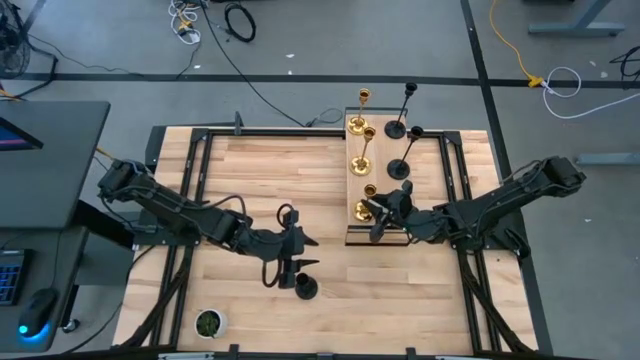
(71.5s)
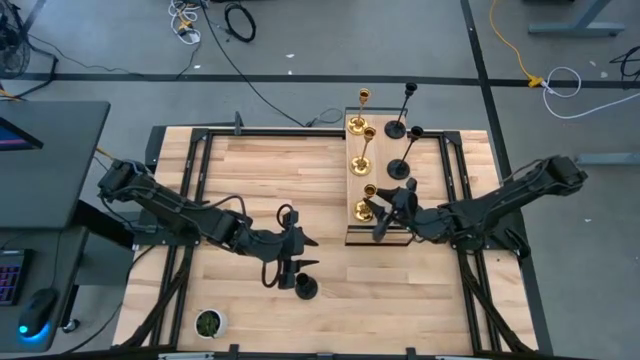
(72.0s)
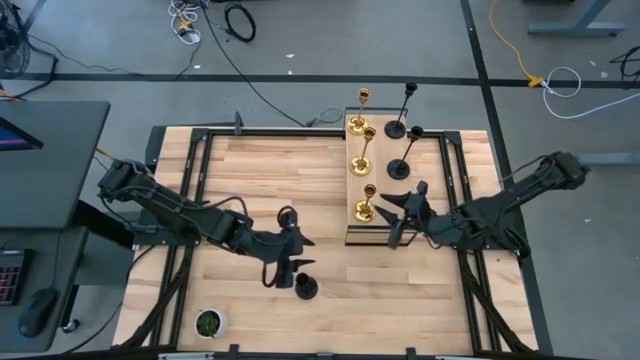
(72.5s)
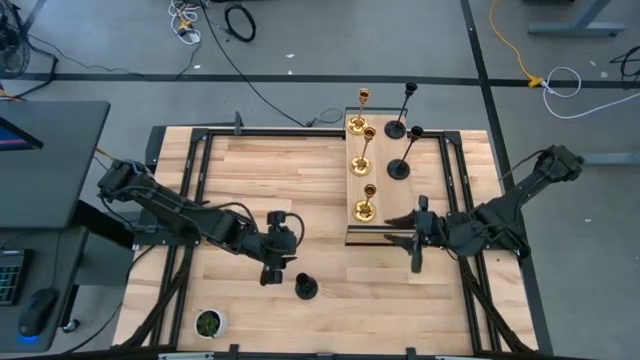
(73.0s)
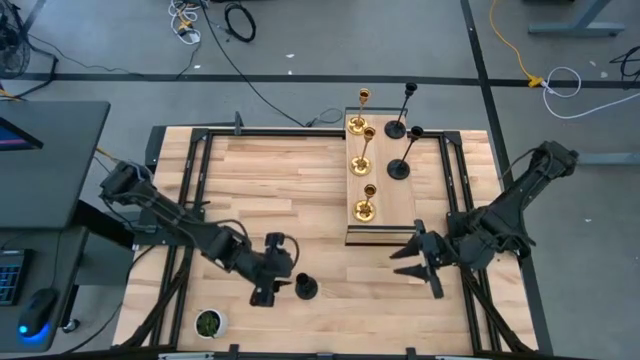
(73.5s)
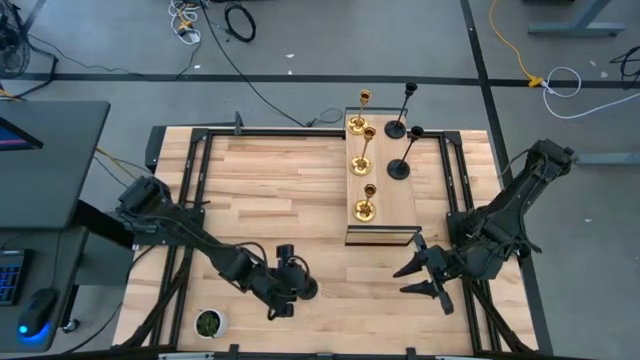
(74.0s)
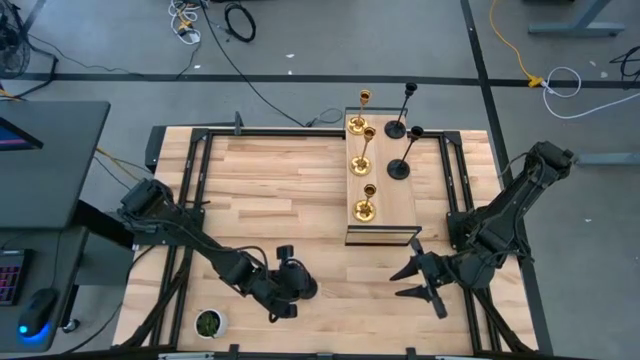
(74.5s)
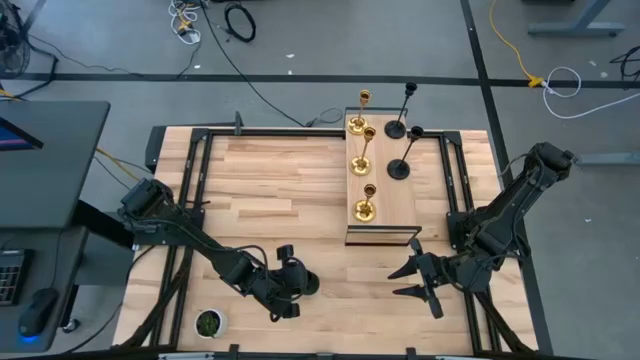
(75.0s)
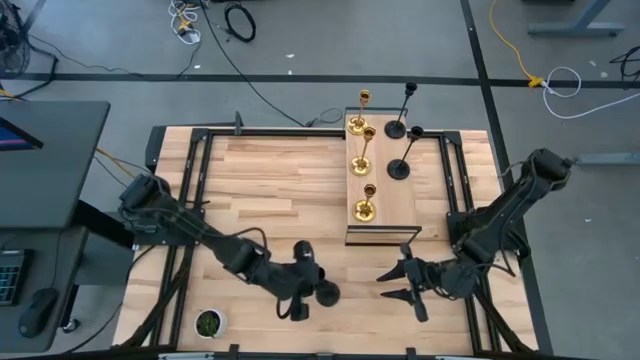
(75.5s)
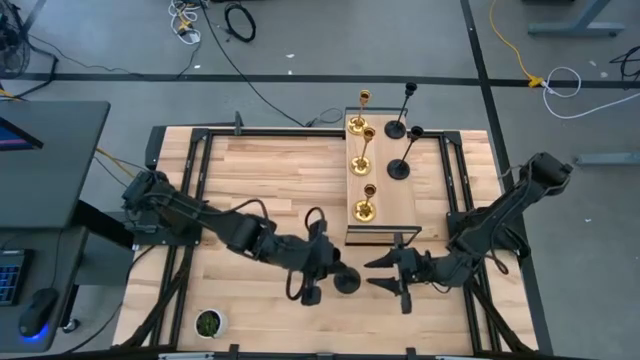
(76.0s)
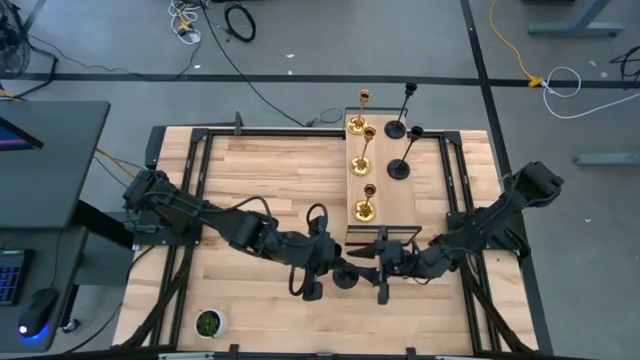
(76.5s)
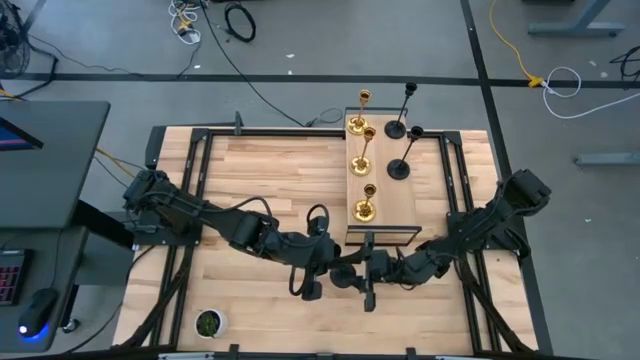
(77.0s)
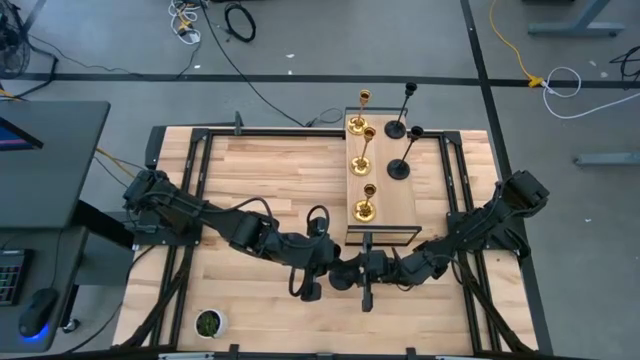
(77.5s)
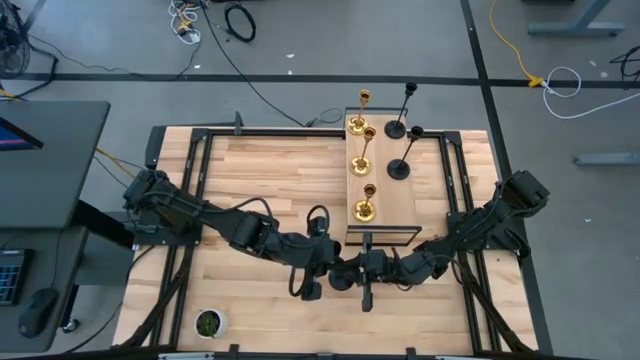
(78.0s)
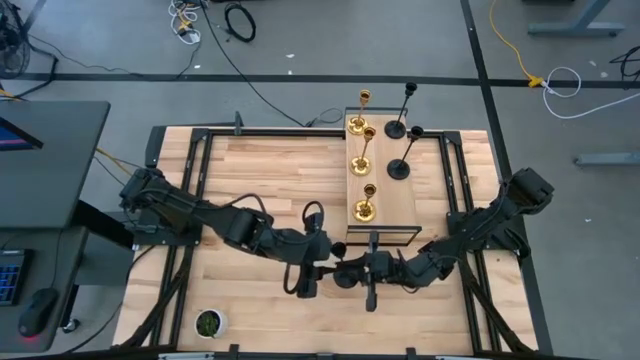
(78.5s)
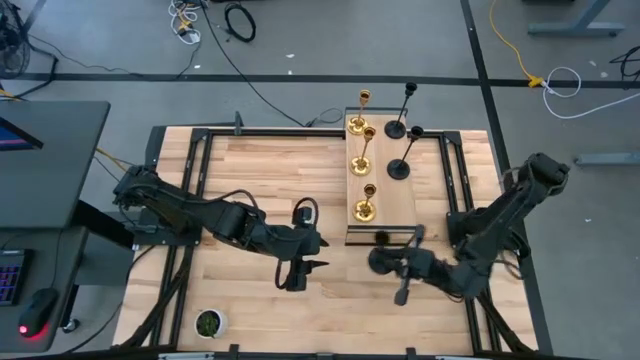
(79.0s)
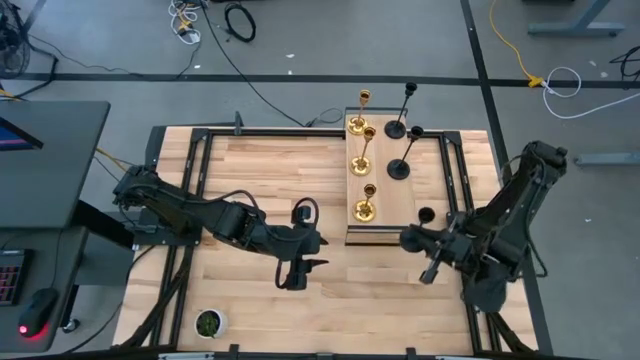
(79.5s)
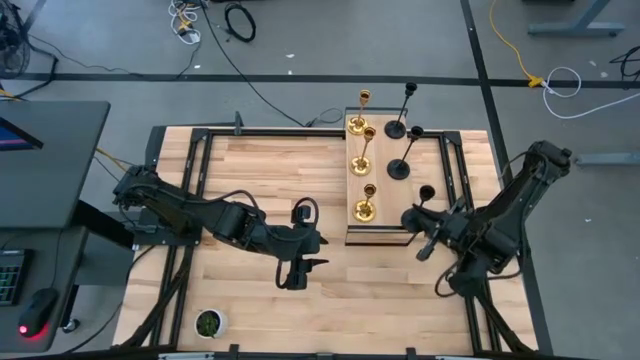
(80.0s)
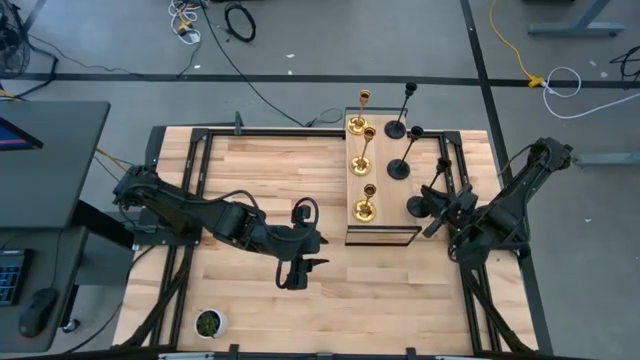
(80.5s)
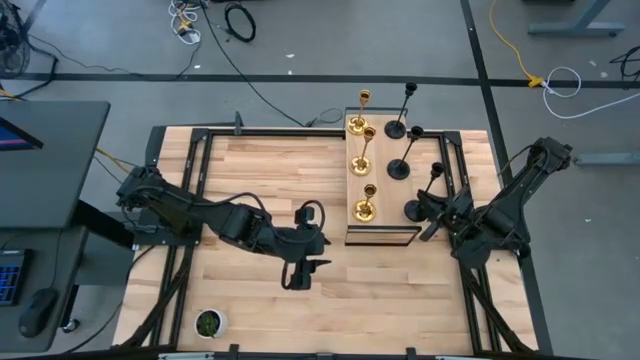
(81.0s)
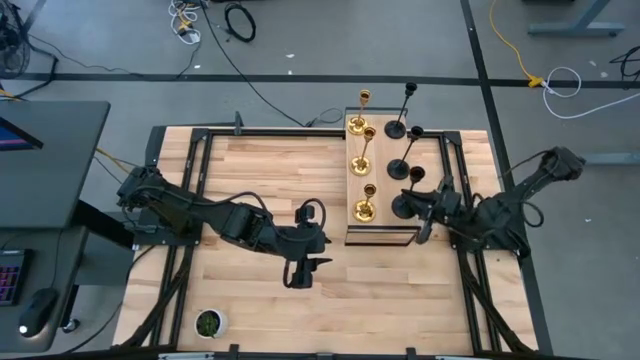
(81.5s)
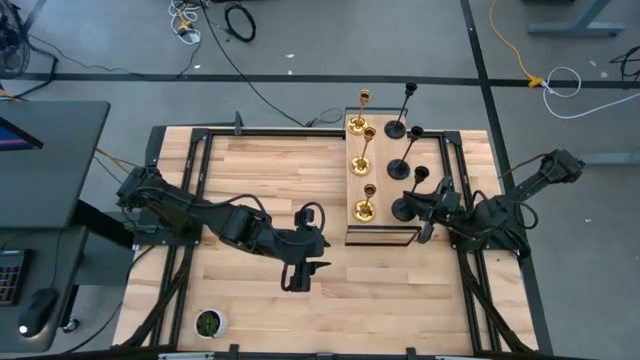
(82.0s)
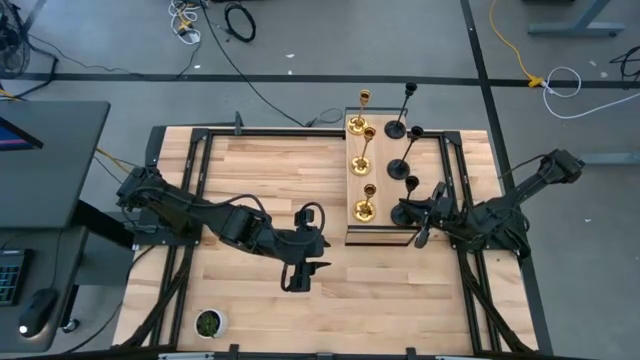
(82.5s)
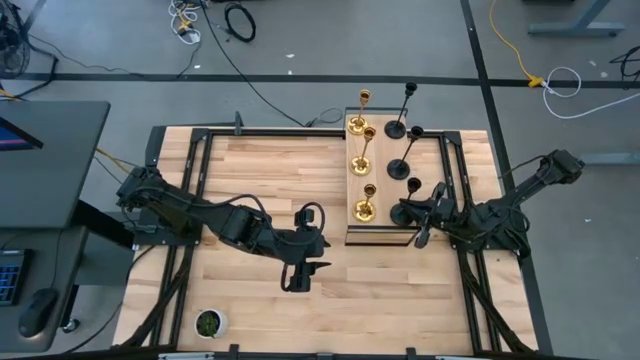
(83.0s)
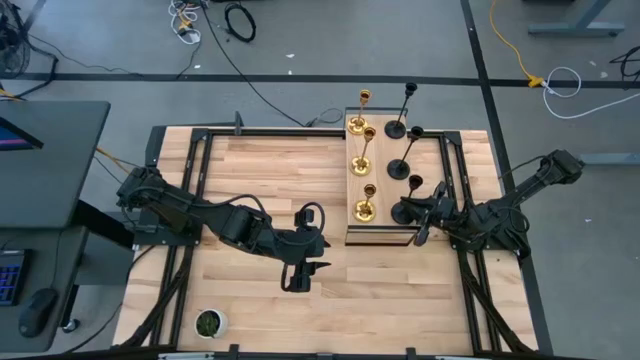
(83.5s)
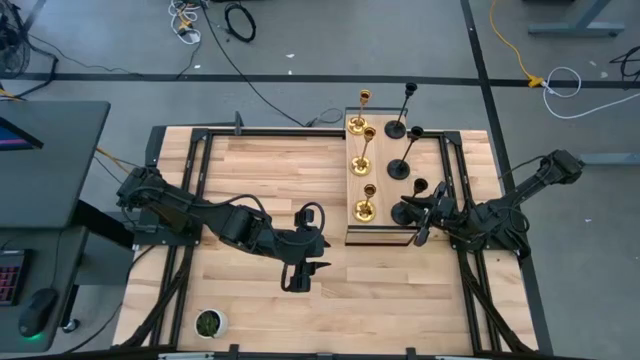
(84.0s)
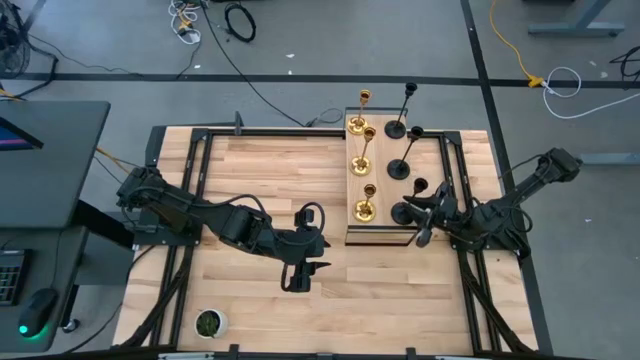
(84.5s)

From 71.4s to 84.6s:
Task: Pick & Place candle stick holders
Put the black candleholder on the shelf aligned with the other black candleholders

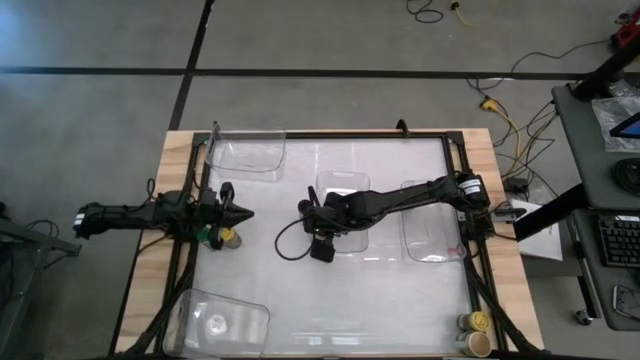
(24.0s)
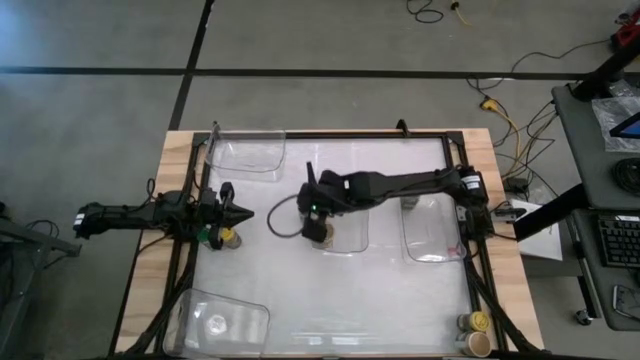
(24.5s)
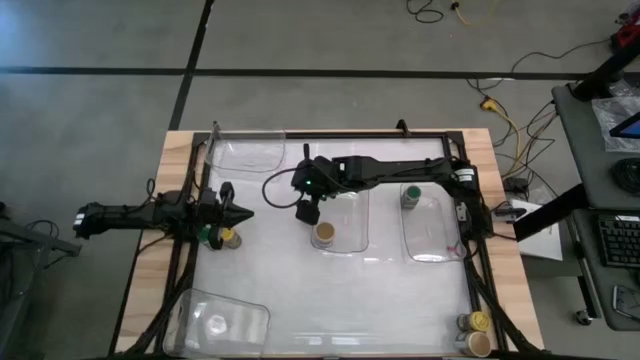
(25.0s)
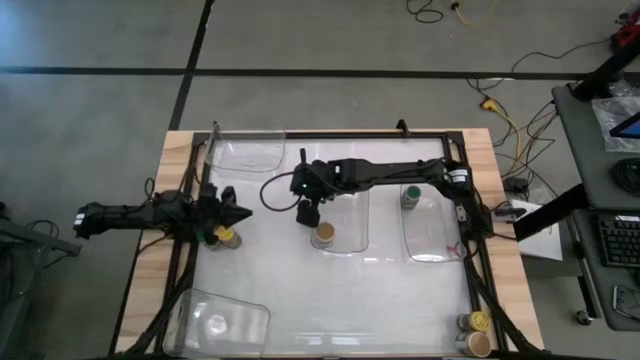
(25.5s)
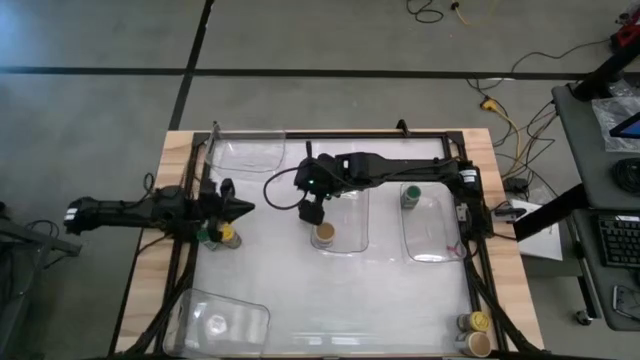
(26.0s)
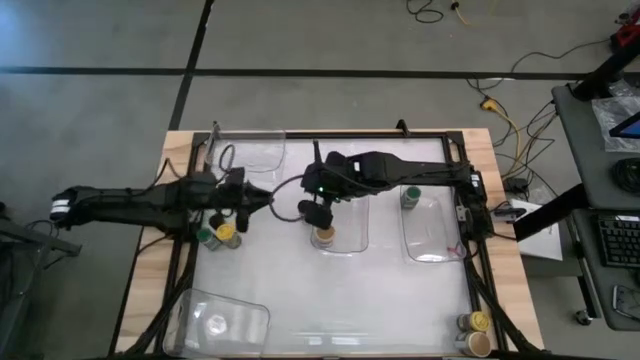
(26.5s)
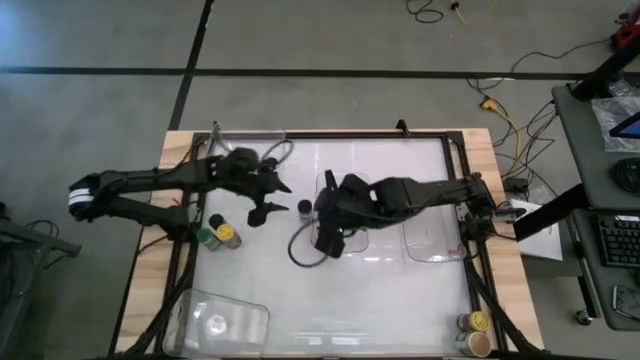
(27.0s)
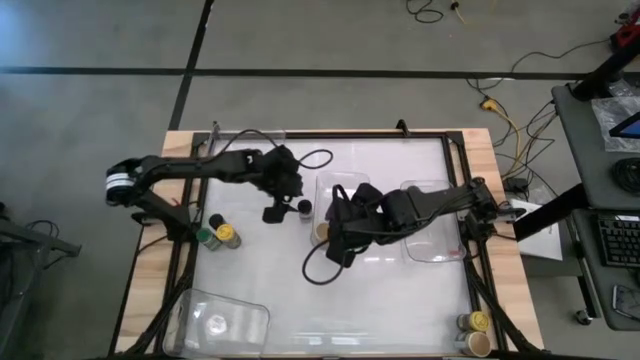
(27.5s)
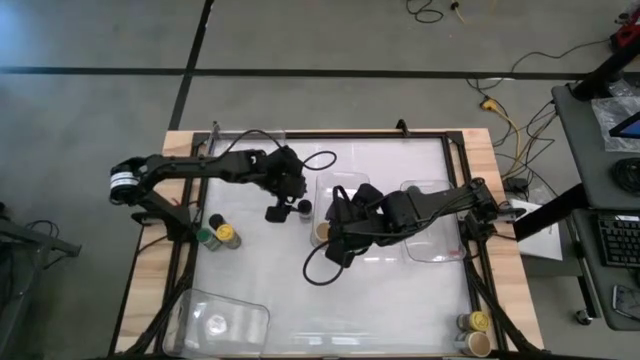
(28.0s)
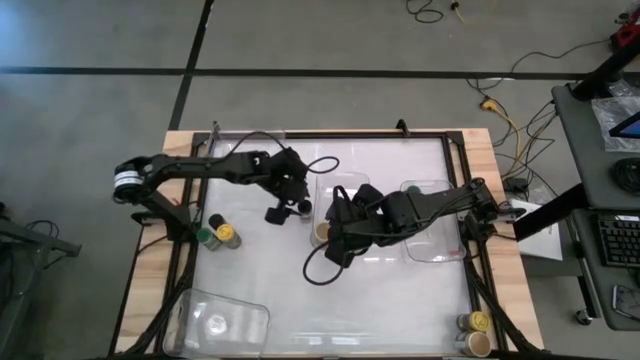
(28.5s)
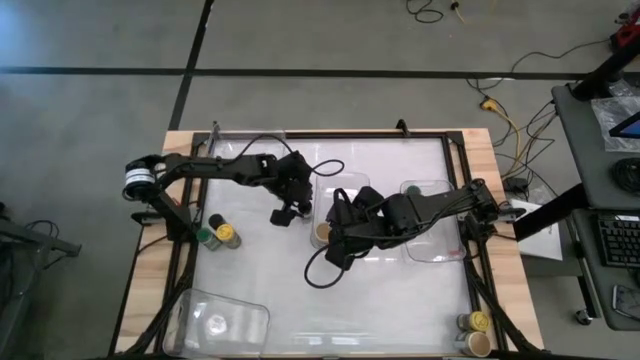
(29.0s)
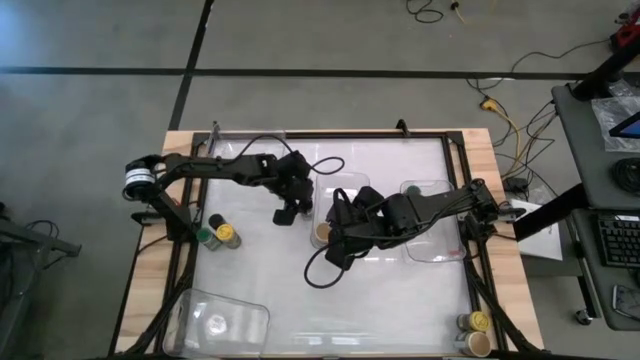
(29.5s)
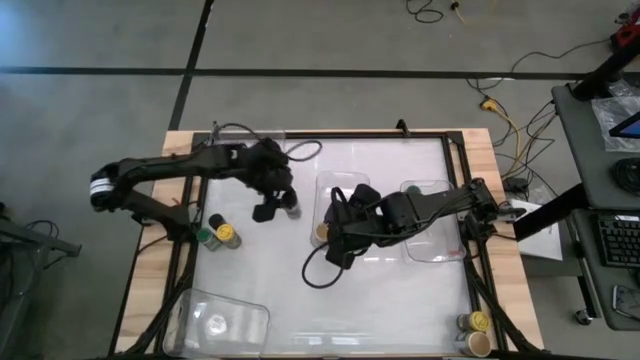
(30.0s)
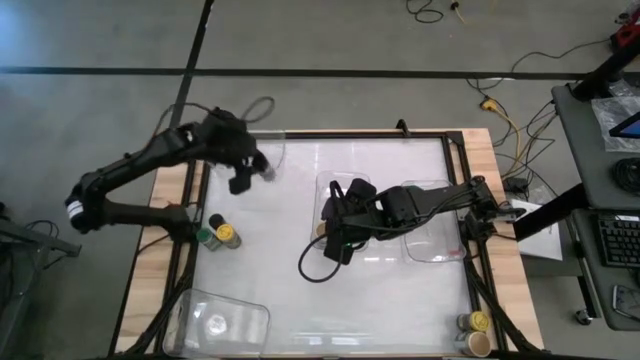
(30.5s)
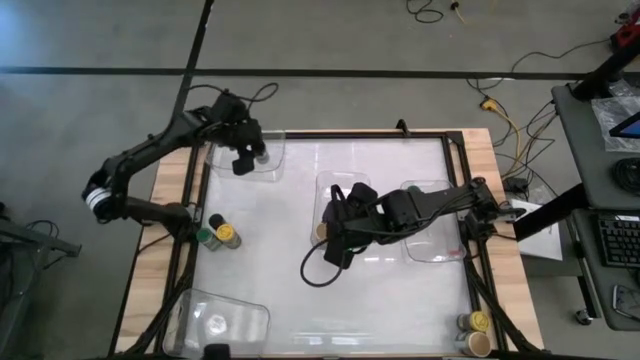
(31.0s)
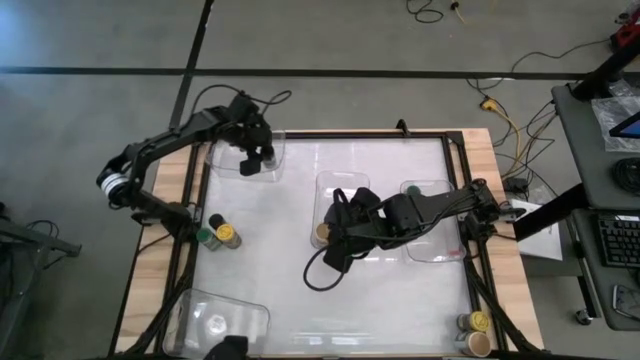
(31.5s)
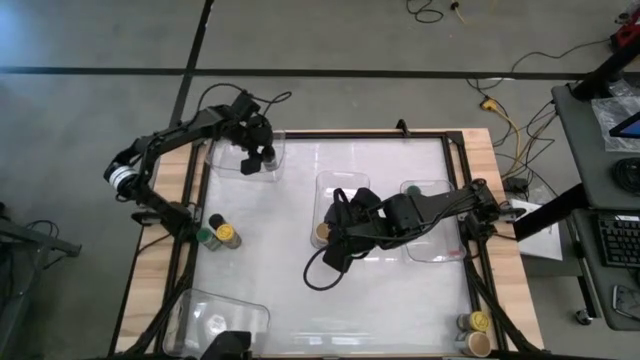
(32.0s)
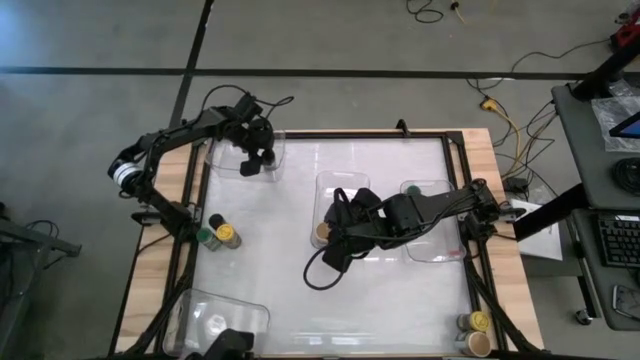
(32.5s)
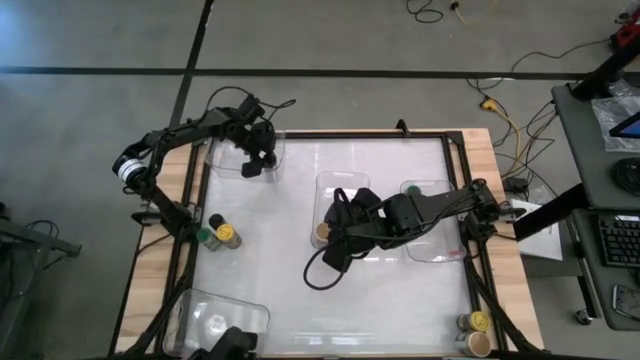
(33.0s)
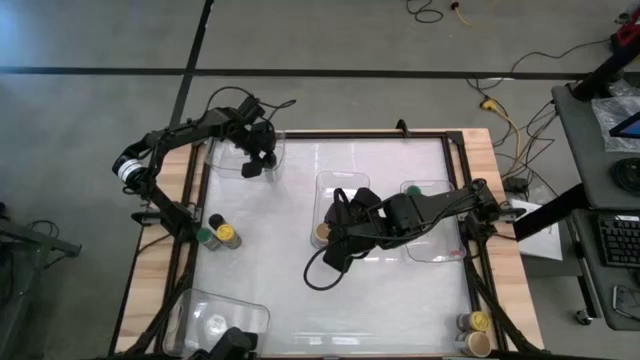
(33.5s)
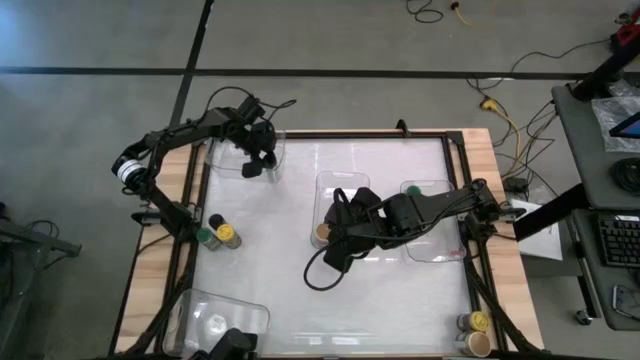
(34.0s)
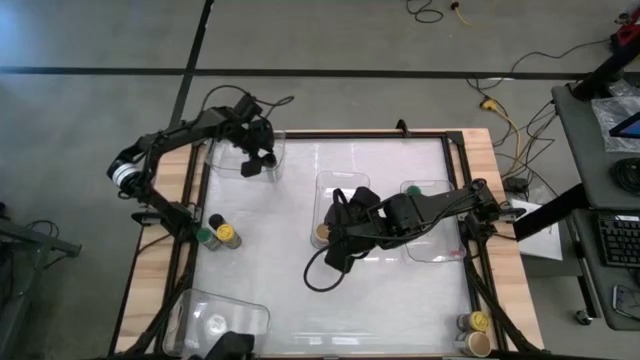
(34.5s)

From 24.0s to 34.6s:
Task: Sort spices by type
Put the right black seasoning bottle into the top left transparent bin
